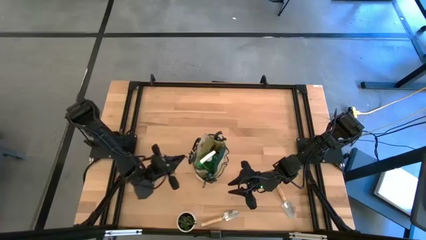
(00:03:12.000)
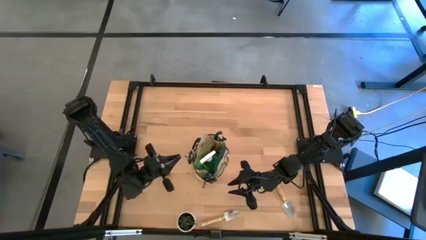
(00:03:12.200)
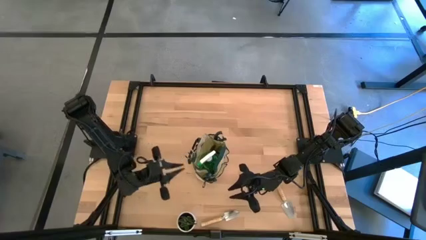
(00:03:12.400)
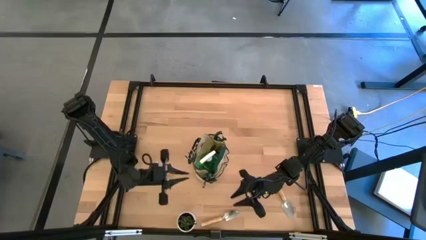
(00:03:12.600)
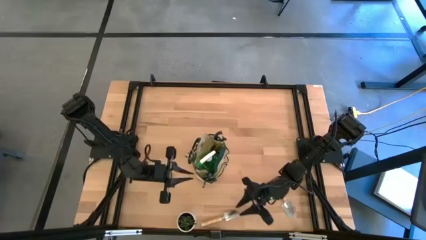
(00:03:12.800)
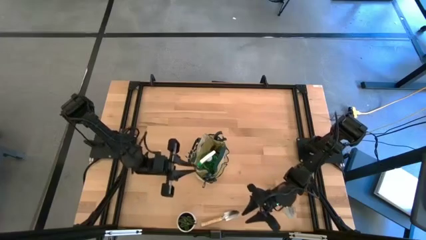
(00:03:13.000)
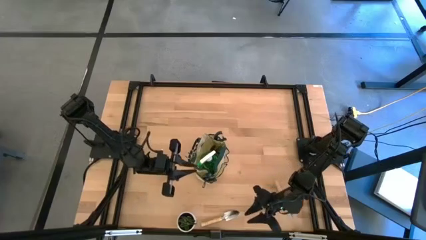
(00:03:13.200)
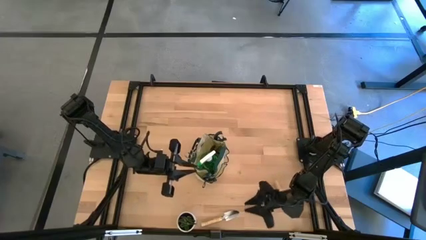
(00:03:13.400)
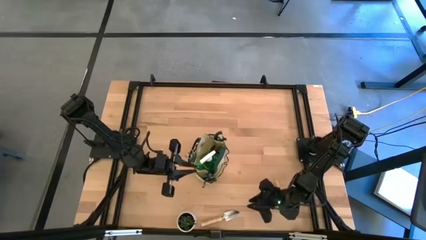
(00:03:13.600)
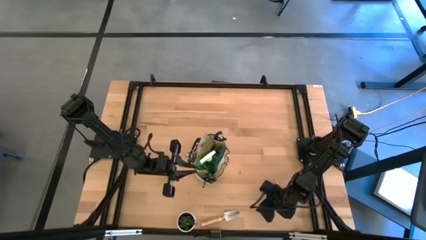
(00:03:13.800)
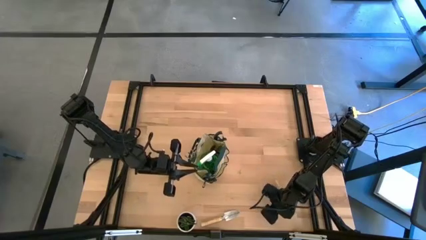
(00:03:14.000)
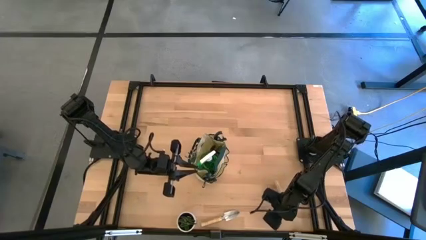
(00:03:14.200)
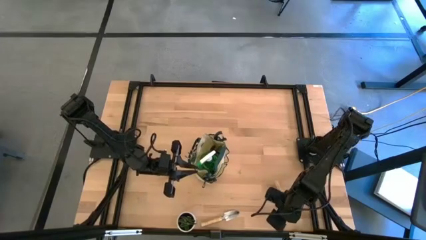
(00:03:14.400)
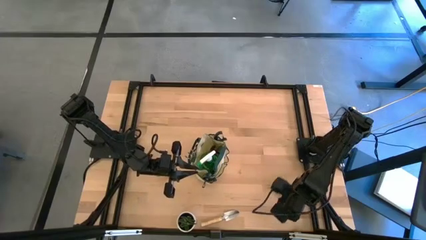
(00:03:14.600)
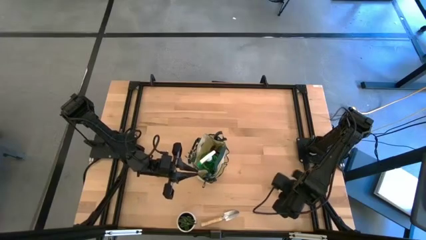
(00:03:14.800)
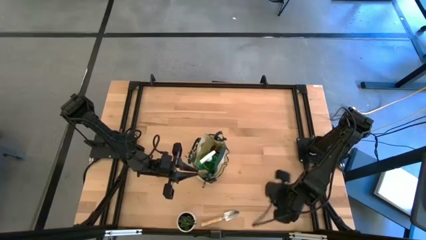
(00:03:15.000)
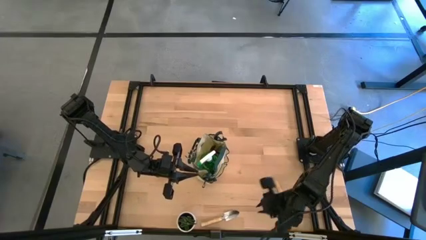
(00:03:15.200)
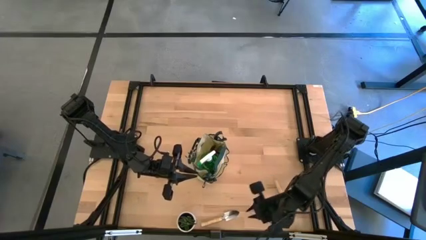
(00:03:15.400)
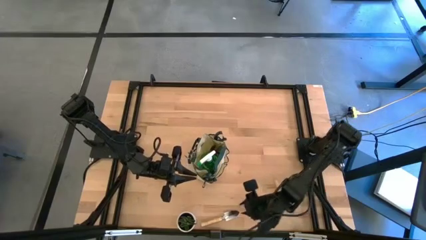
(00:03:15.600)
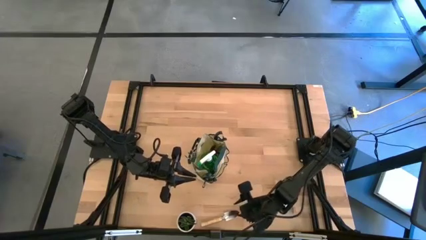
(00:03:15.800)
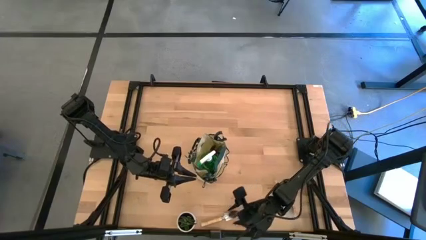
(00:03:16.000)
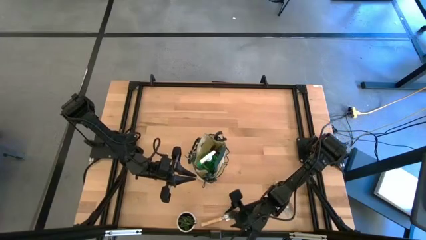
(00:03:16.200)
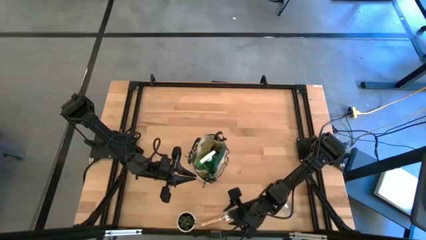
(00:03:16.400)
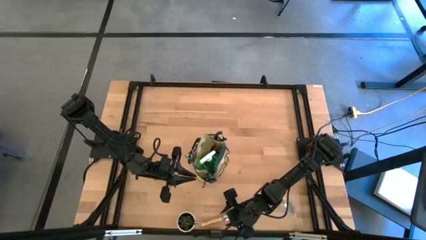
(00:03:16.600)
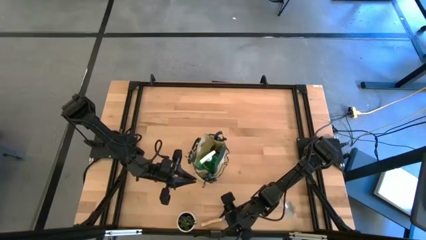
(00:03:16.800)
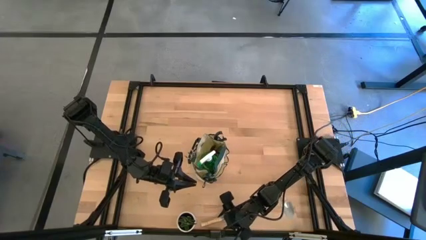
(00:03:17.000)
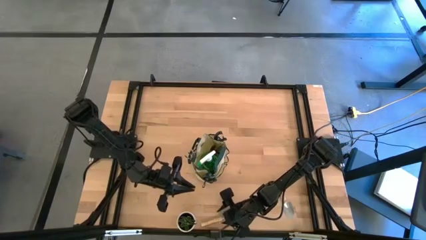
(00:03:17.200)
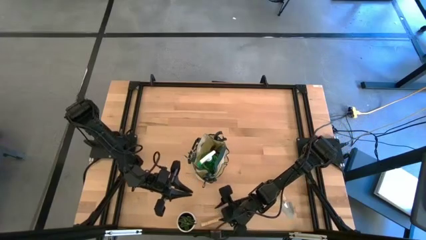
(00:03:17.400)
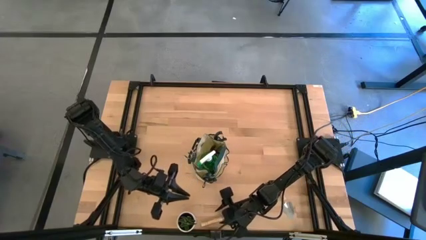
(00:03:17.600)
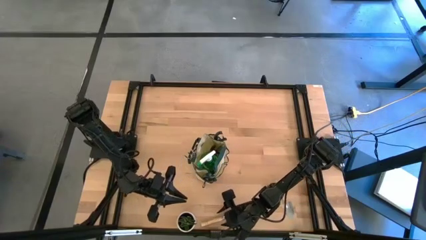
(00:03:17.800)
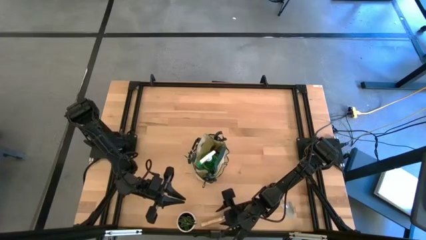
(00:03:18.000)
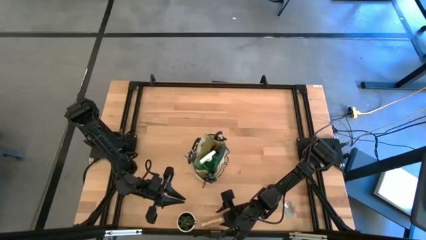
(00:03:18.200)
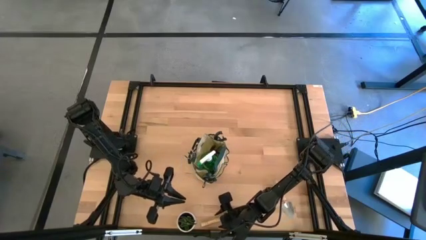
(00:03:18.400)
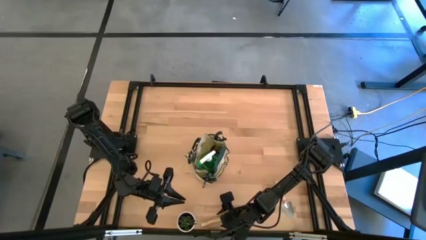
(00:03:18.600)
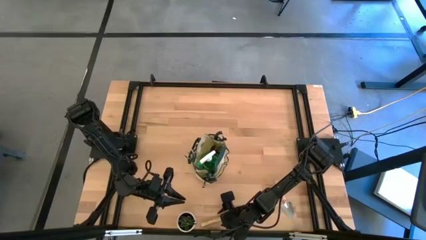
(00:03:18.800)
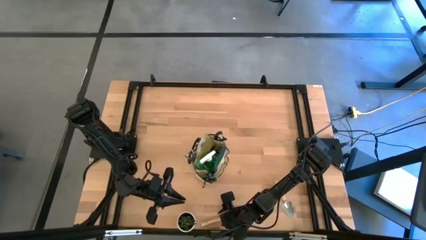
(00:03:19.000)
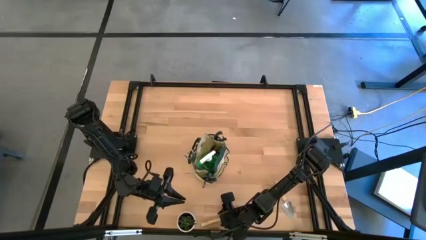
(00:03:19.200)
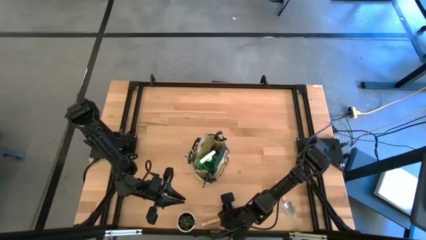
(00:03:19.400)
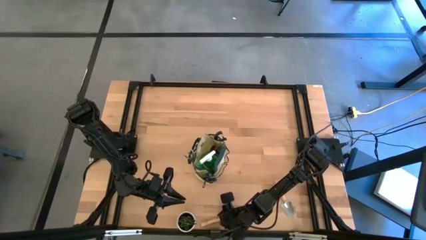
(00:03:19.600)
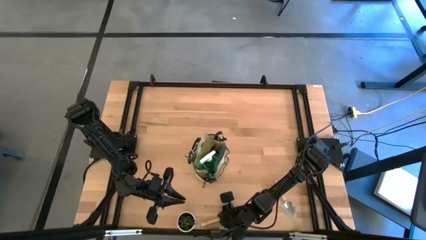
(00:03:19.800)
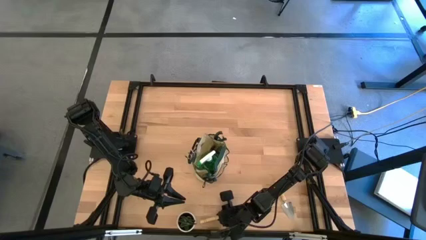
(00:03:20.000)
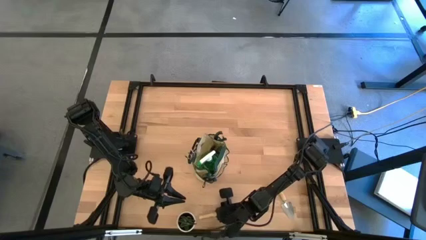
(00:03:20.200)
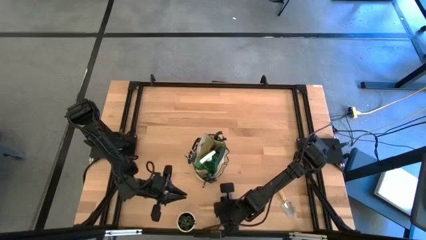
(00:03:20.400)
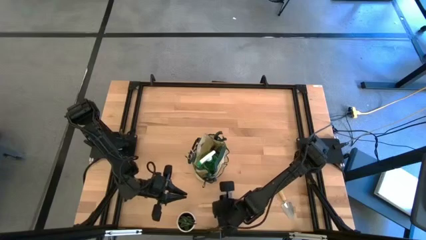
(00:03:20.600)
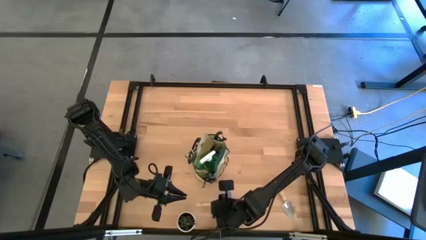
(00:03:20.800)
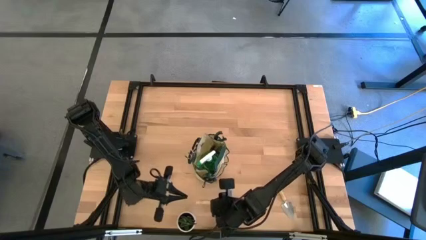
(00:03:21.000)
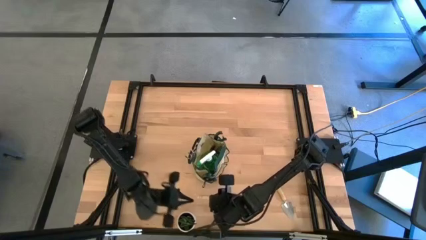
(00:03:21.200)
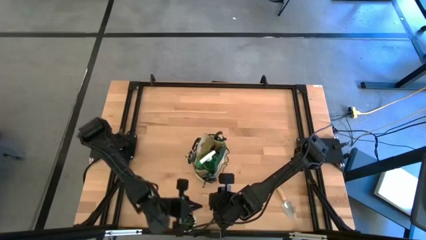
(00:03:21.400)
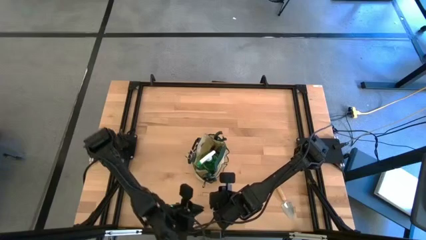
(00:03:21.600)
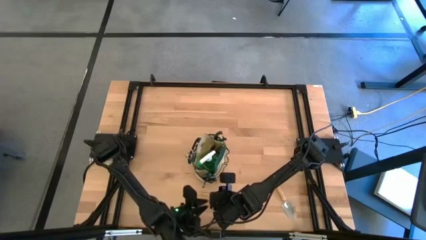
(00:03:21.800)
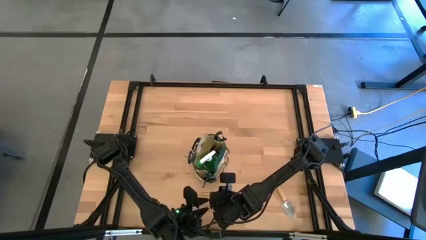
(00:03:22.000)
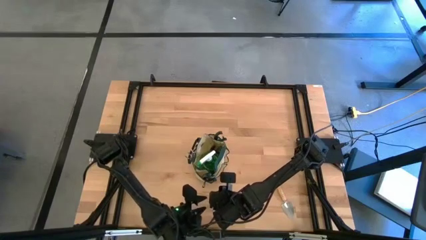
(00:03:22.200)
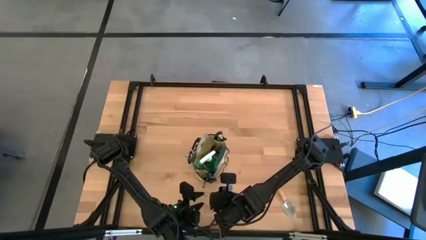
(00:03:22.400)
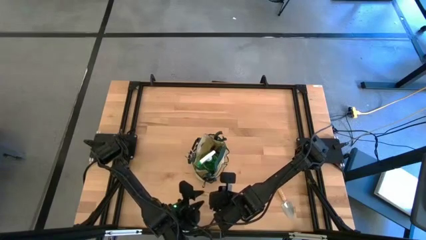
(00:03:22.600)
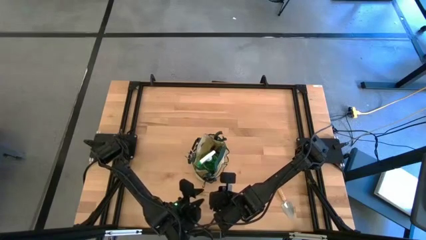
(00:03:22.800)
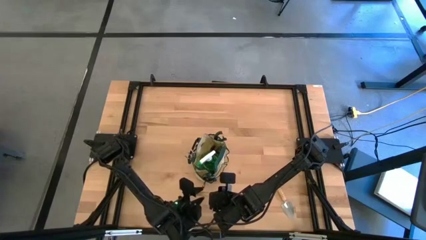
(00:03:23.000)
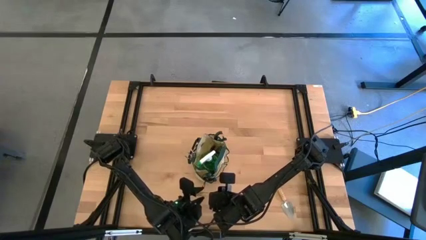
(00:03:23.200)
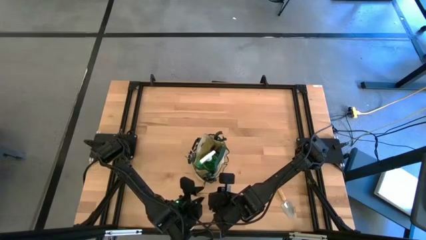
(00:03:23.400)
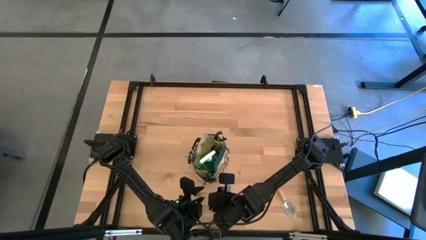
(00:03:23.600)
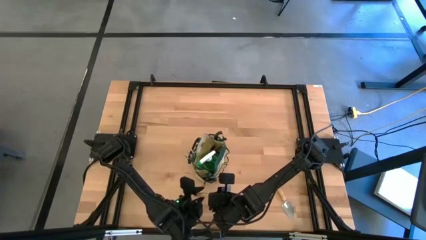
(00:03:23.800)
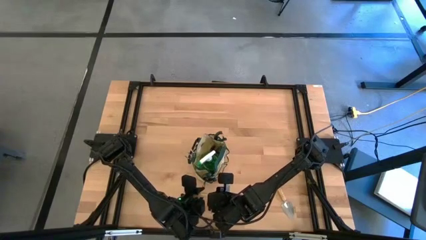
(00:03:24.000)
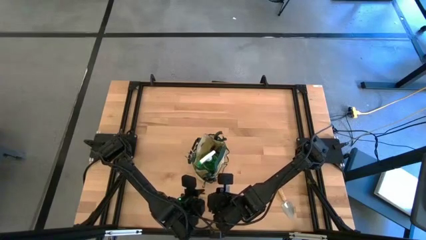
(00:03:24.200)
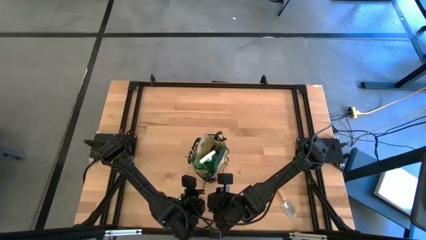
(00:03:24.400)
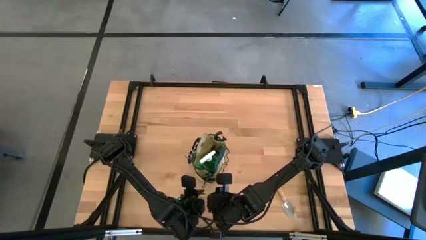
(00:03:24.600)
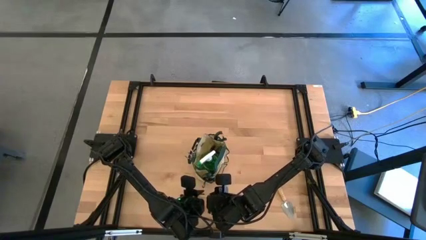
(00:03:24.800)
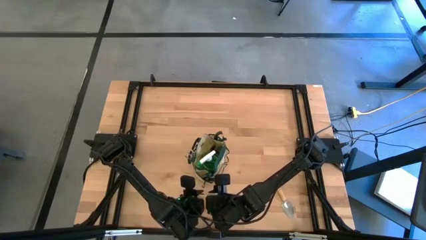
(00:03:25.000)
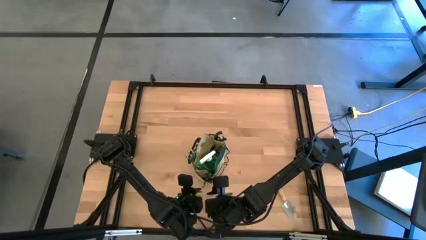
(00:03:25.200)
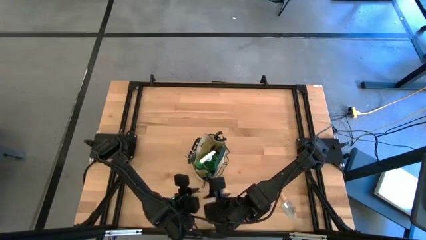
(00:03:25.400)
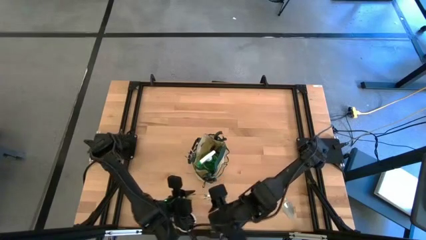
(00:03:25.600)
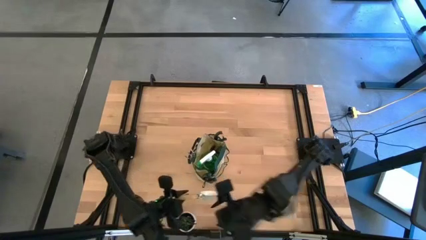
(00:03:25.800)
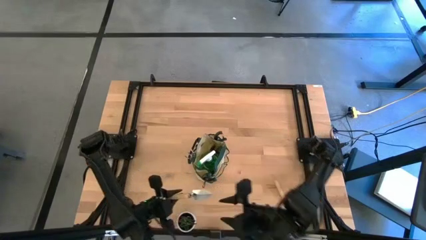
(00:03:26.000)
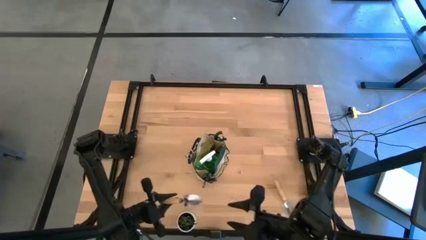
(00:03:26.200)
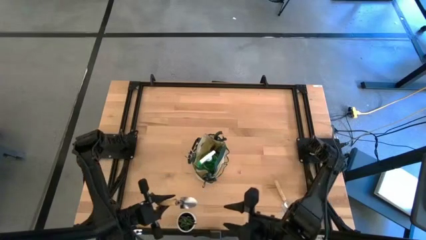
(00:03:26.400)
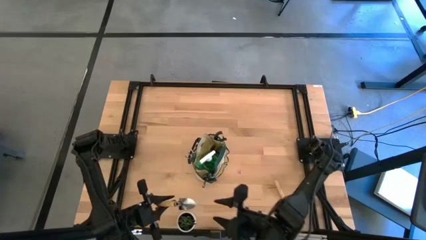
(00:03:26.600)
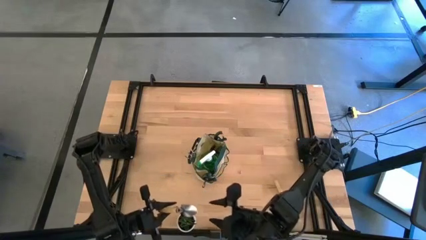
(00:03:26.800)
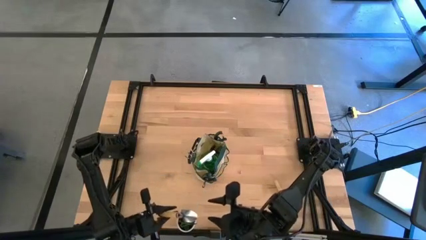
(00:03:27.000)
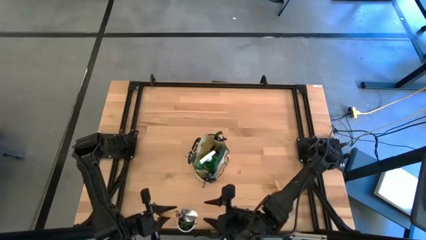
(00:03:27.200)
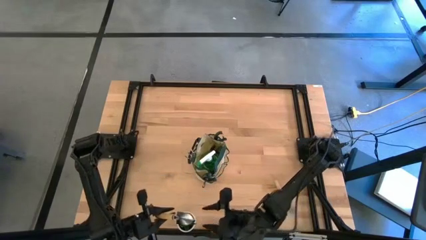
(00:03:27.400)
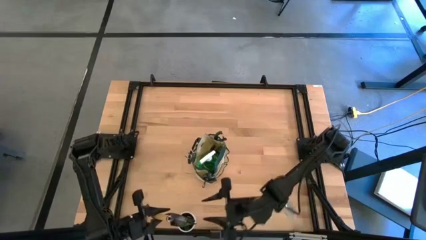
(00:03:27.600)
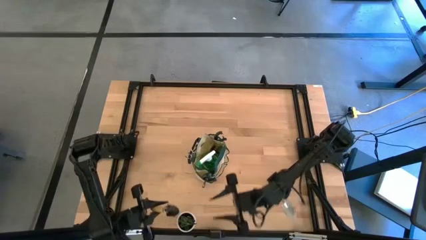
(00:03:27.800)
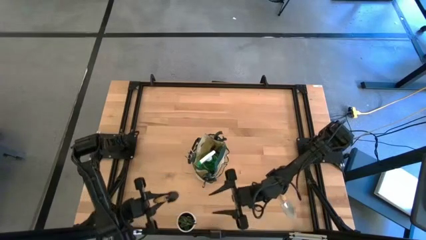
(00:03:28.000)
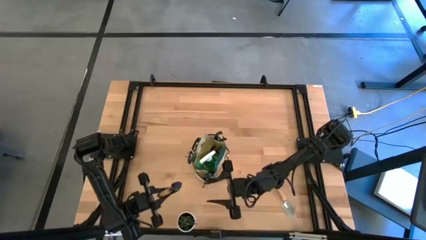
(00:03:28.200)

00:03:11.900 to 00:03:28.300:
Task: Pick & Place Garden tools in Gardening bag
Put the left brown trowel into the side pocket of the green gardening bag
